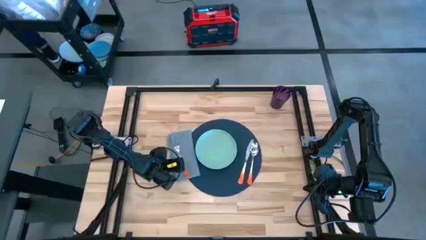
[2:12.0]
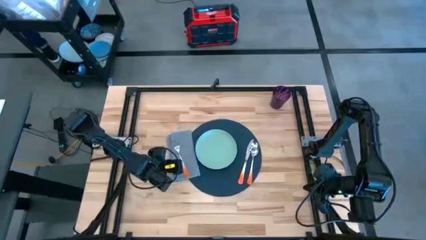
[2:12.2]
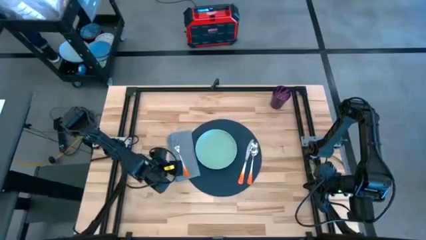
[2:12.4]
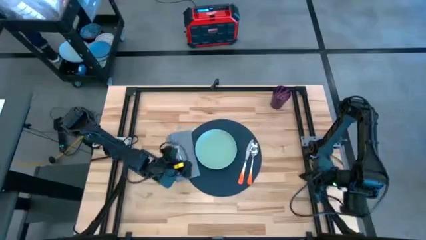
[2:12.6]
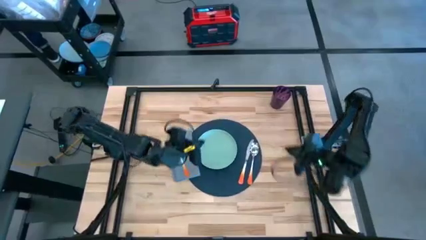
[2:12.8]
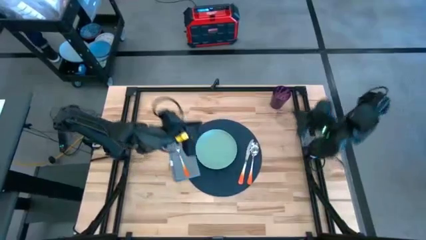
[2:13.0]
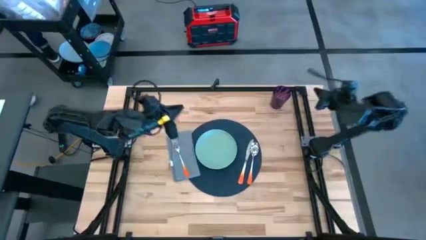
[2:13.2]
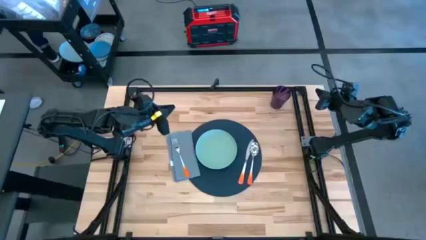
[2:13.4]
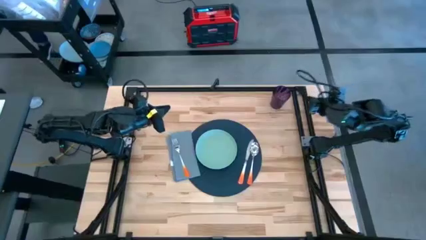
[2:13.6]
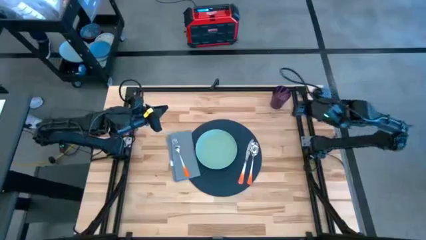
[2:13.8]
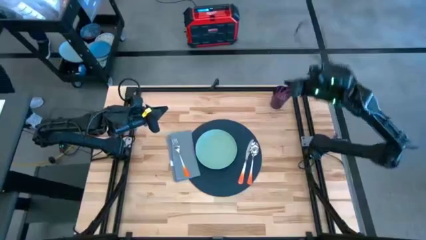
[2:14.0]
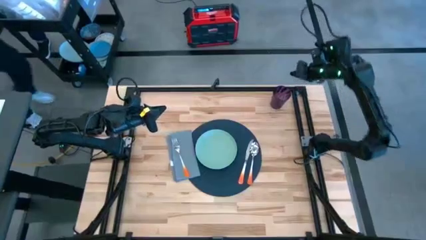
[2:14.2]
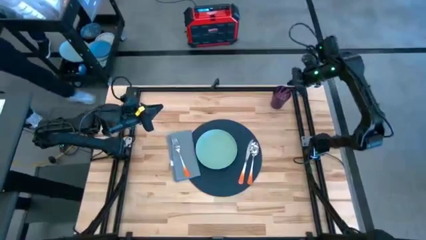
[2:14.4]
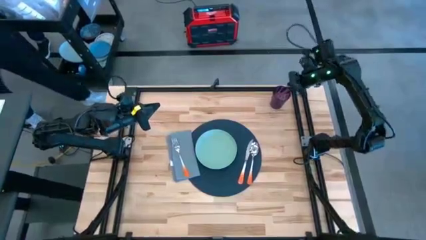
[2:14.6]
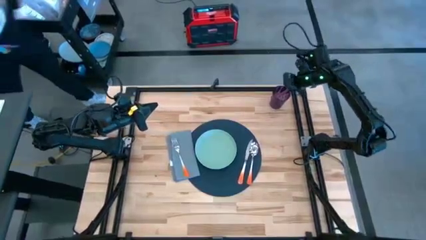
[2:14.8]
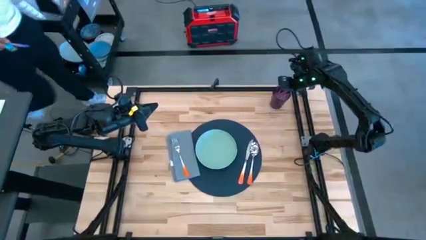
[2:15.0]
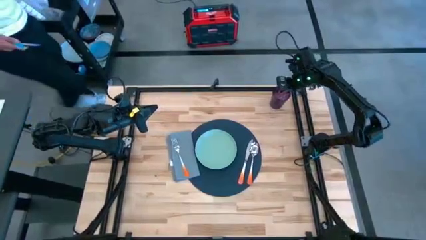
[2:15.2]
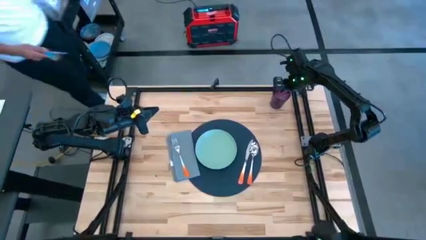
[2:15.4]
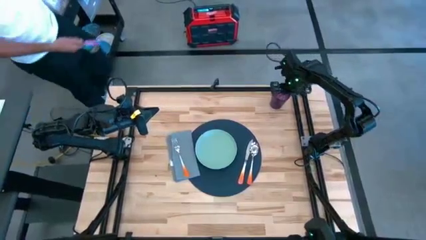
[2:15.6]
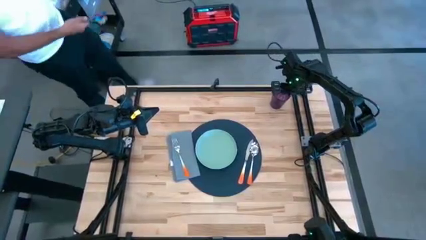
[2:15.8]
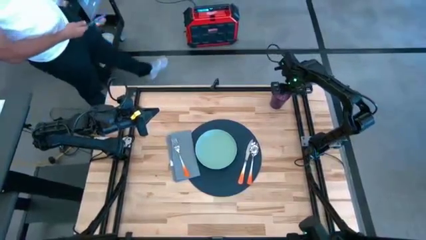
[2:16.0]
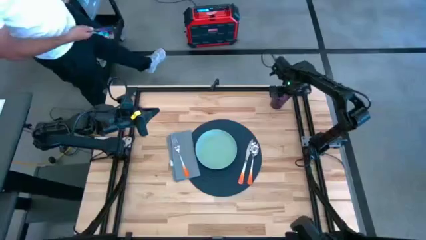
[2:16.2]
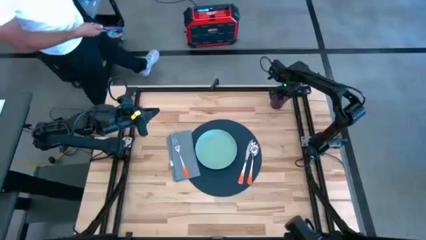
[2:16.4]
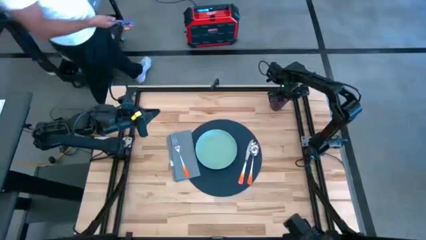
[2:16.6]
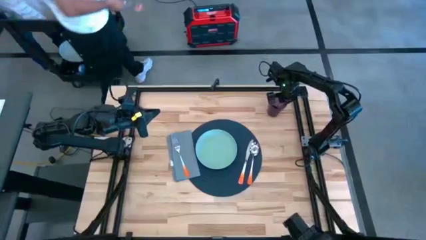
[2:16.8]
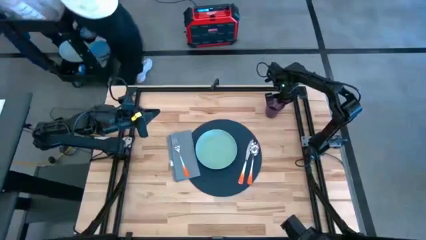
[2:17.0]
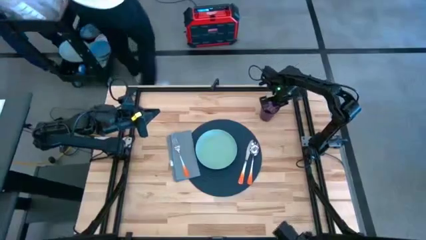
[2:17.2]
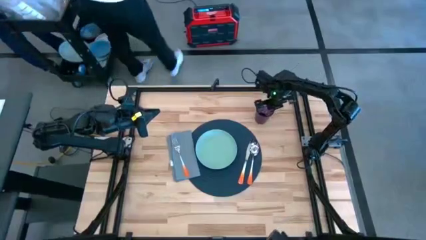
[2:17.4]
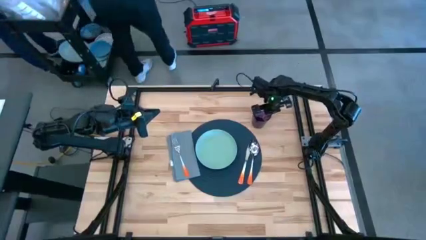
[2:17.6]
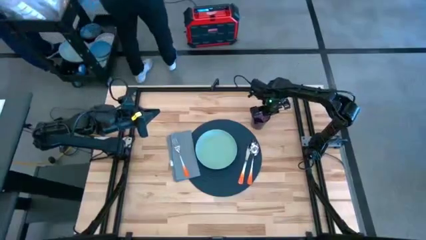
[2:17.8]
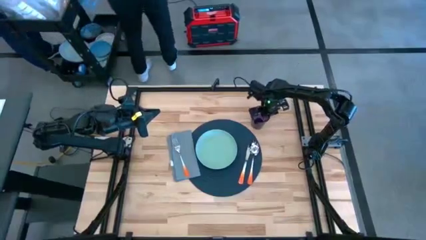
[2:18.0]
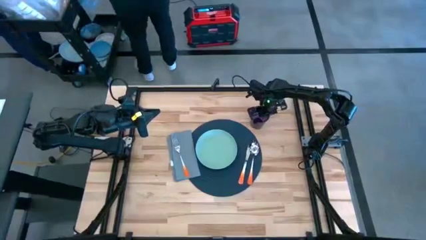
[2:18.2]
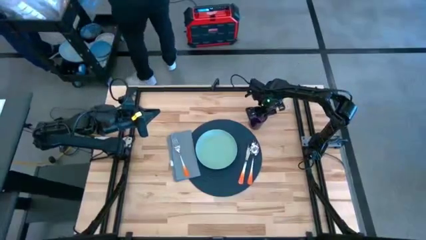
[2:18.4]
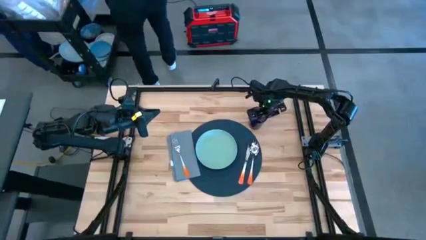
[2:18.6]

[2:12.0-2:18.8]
Task: Set table place
Move the violet glass to the top right of the blue placemat

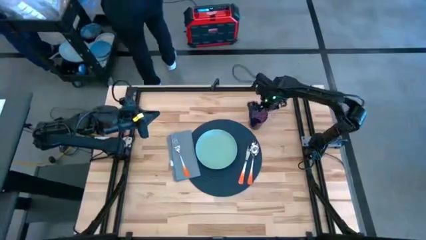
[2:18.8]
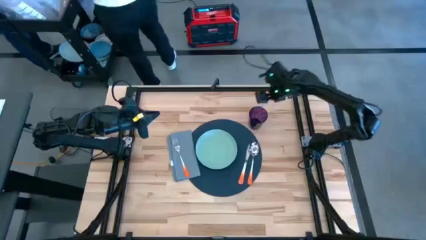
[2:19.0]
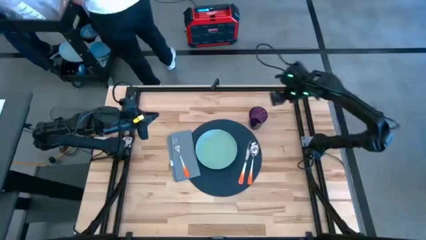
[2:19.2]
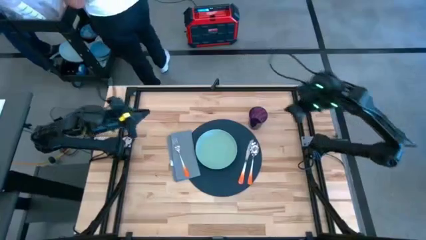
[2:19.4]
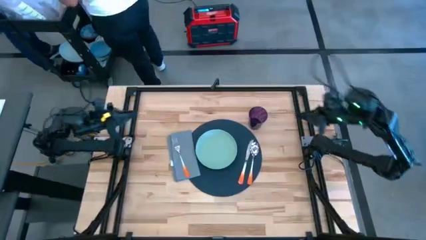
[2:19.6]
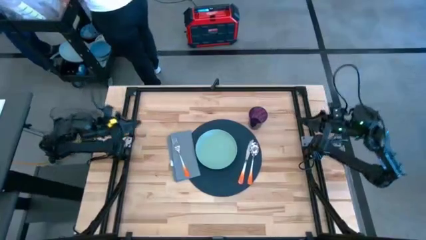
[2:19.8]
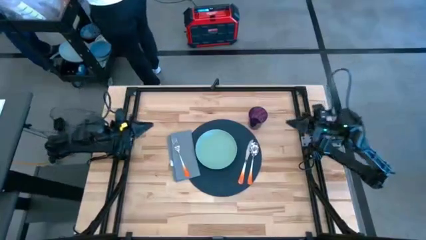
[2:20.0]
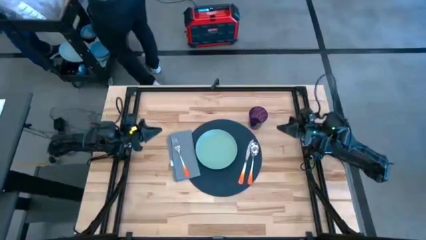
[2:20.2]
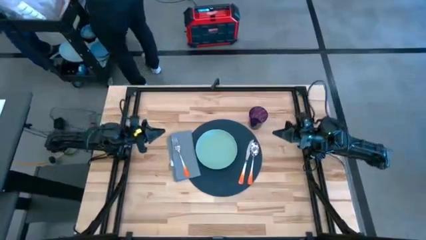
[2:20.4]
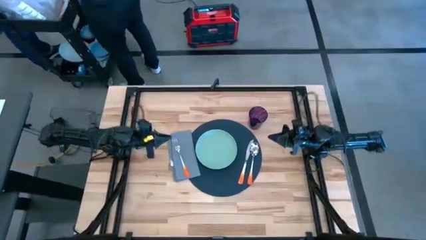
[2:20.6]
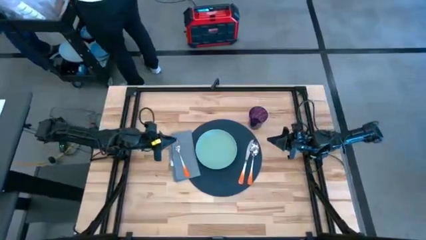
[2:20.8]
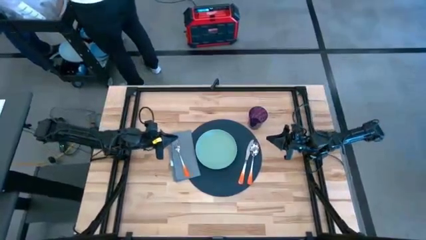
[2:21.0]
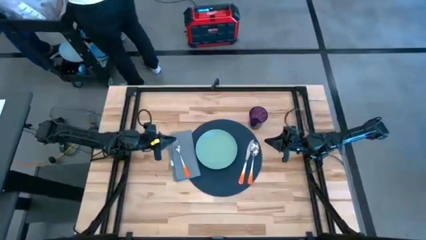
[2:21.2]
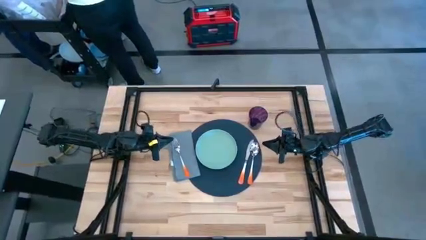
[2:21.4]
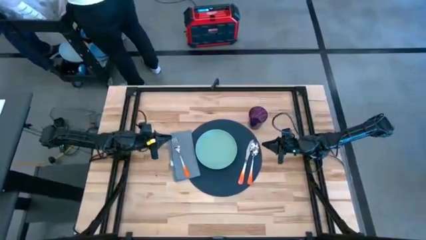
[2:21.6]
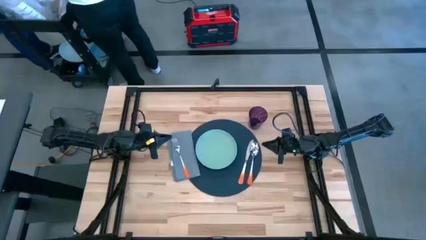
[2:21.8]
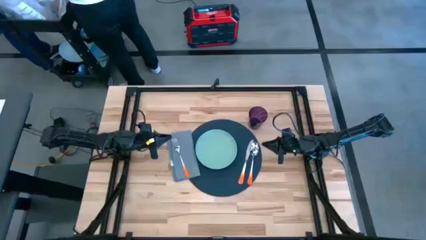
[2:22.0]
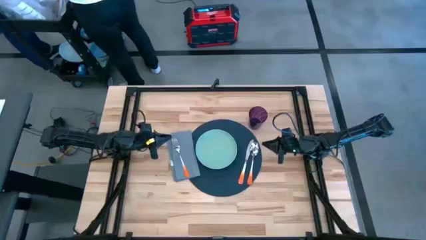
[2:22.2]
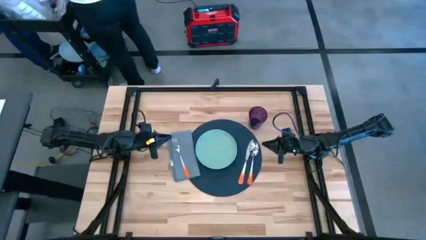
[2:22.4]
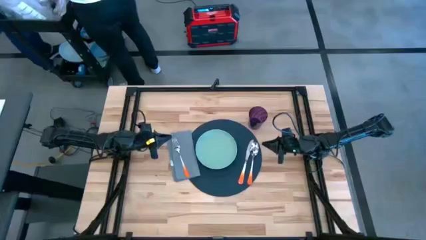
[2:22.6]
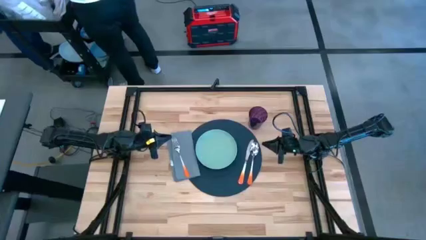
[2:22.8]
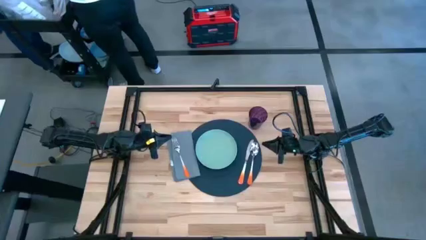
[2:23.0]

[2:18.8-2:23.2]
Return to Home Position

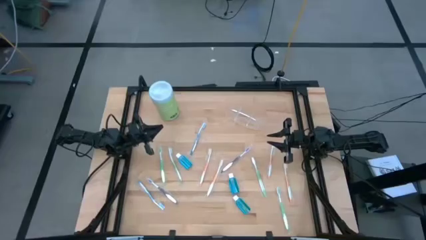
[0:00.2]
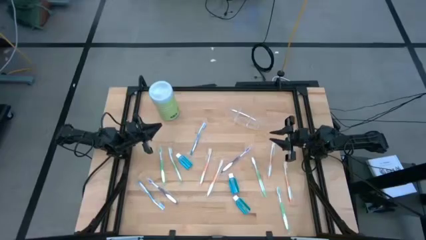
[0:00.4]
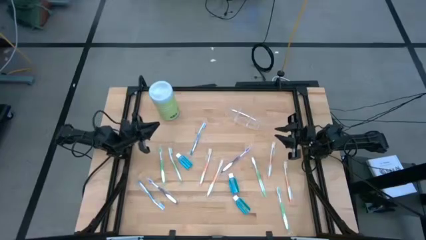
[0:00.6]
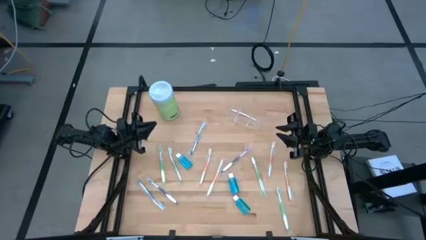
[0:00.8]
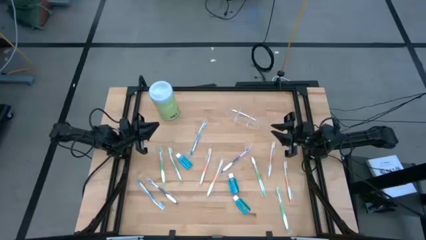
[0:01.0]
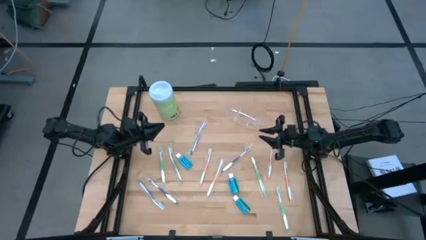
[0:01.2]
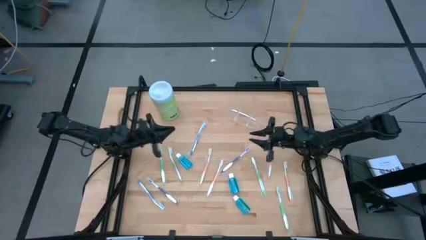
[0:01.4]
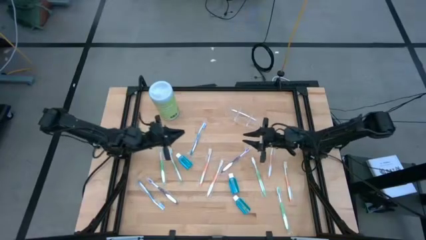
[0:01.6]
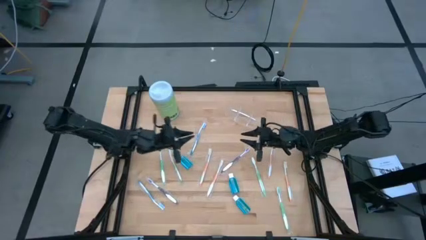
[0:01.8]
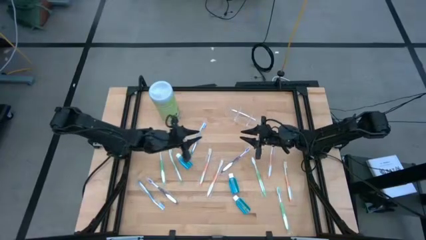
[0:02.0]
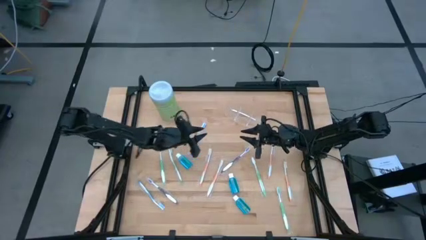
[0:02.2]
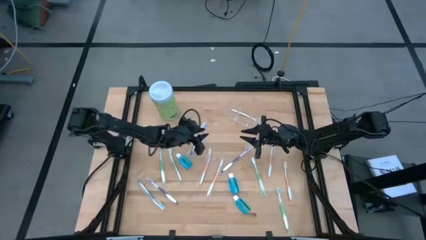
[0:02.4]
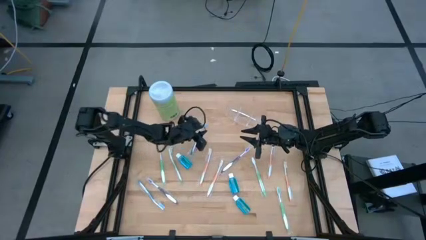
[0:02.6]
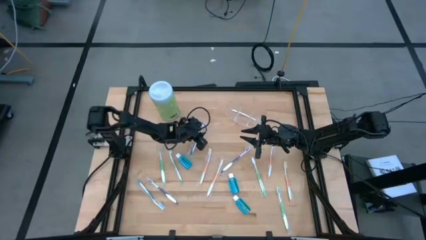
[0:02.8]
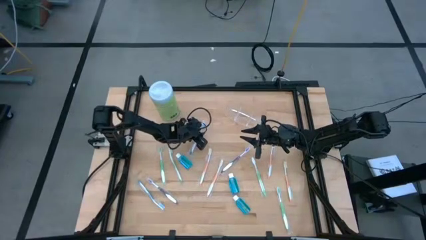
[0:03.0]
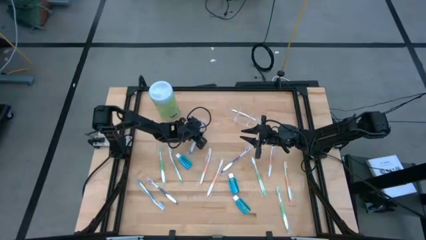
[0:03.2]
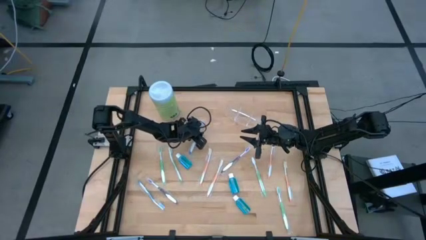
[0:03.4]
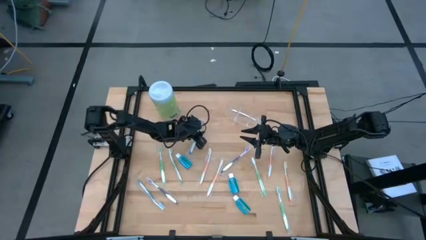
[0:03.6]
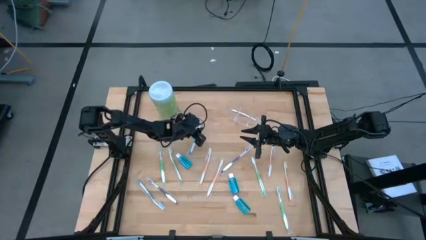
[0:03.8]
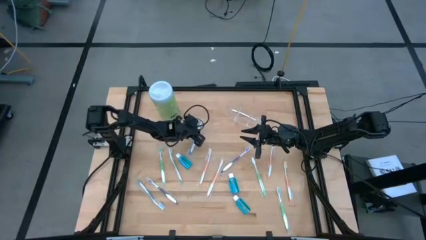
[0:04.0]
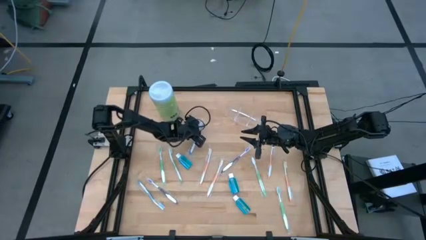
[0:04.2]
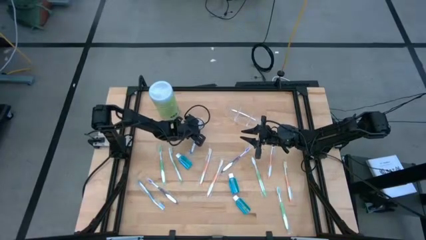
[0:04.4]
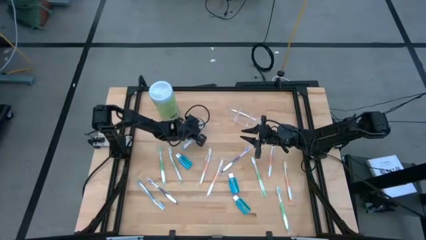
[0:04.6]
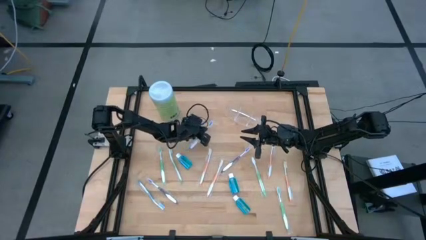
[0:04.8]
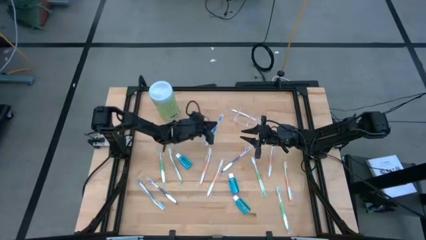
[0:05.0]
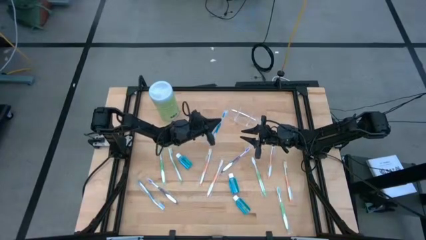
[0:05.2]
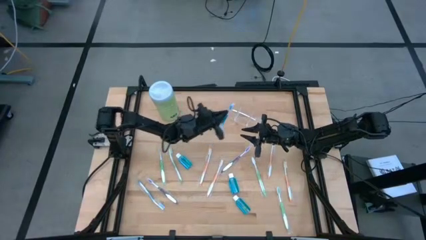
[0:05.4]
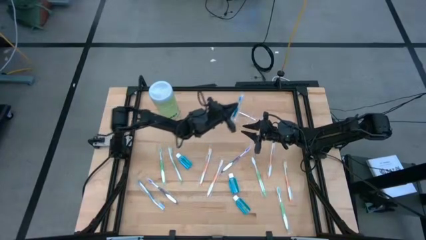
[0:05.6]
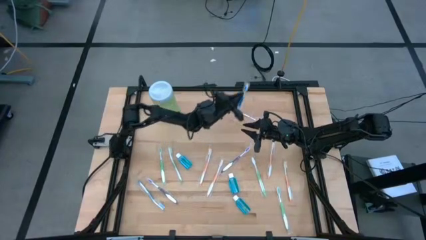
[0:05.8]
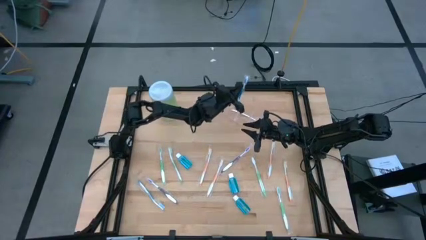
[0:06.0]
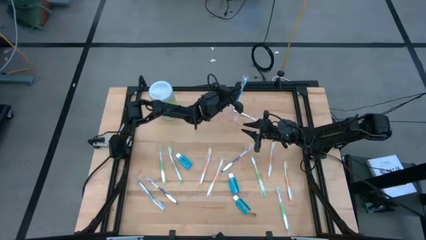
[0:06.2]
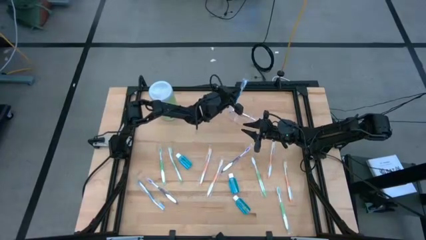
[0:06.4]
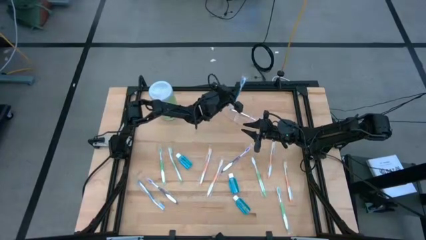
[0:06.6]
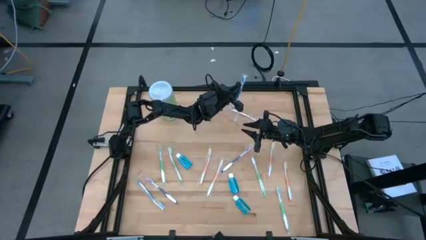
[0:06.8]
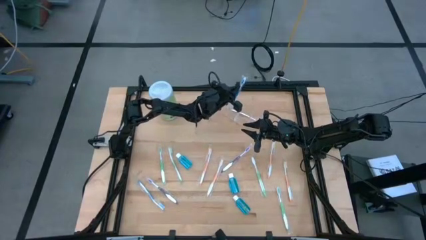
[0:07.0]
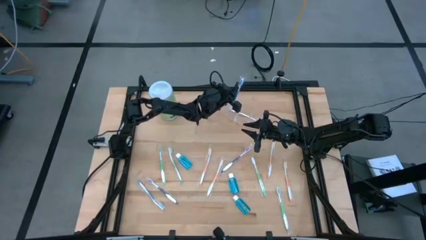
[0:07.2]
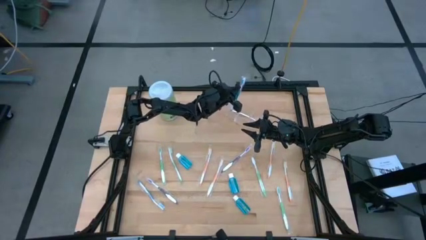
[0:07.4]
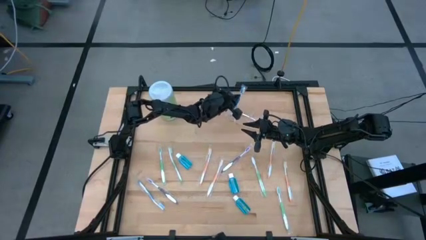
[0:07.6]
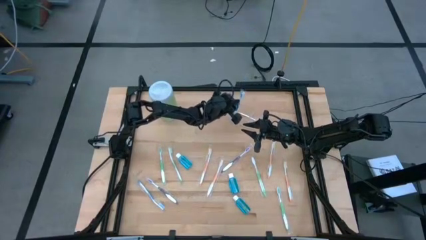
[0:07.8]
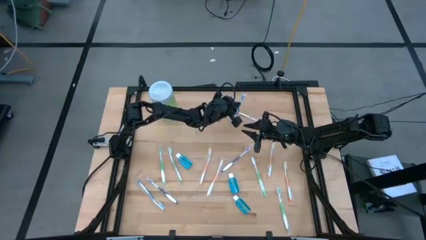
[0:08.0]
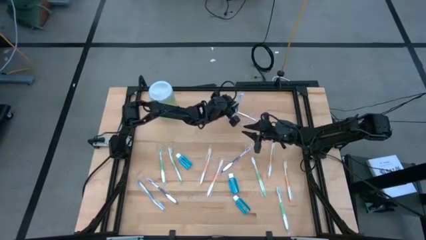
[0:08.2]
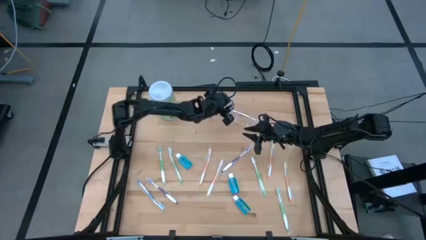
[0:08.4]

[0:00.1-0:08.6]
Task: Pick & Place toothbrushing station
Put the top blue toothbrush into the transparent organizer
